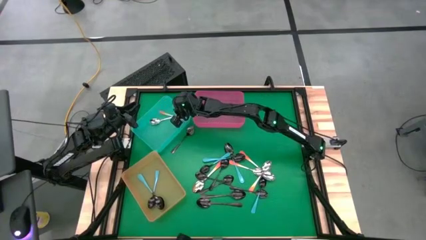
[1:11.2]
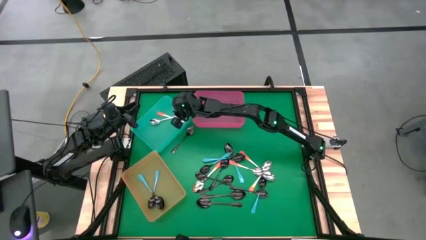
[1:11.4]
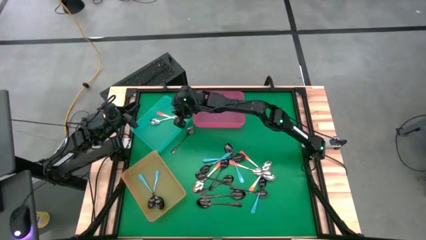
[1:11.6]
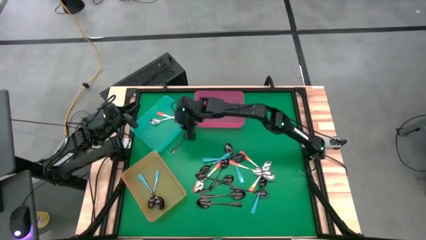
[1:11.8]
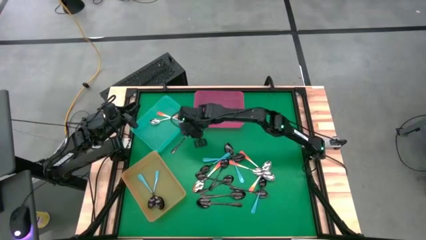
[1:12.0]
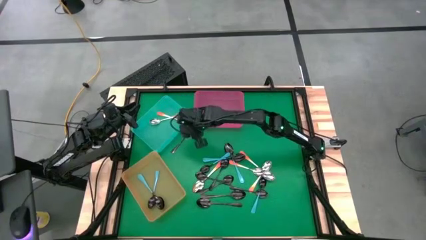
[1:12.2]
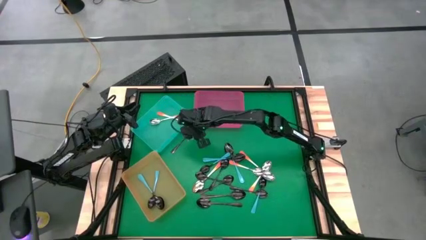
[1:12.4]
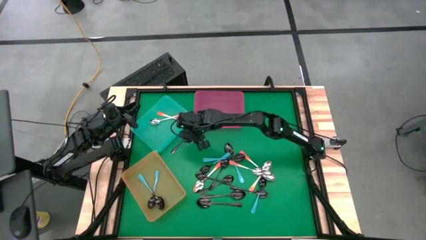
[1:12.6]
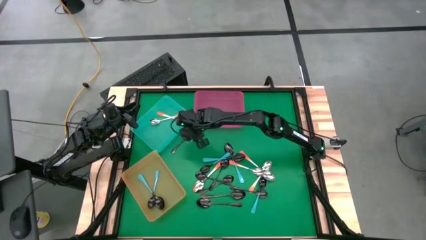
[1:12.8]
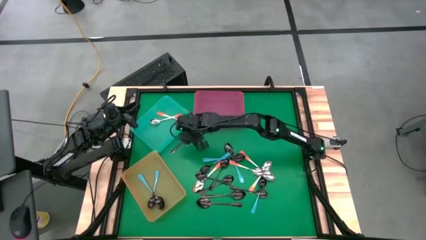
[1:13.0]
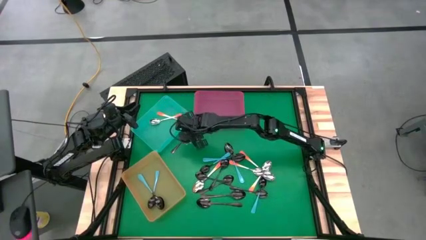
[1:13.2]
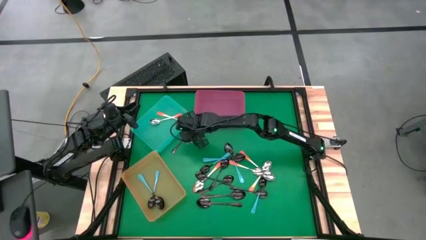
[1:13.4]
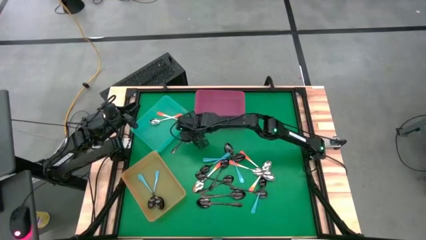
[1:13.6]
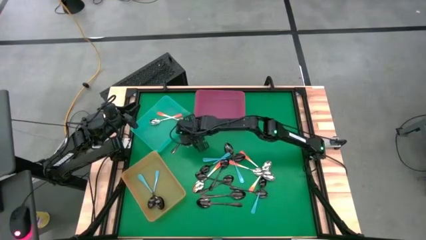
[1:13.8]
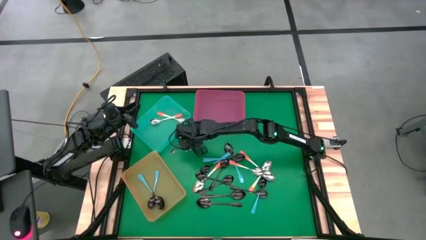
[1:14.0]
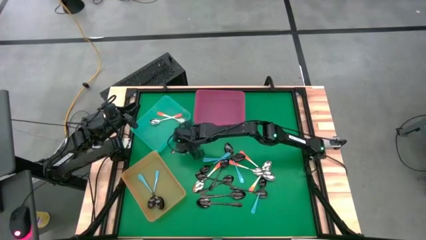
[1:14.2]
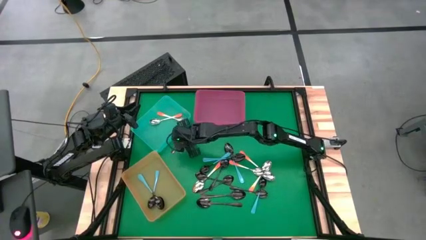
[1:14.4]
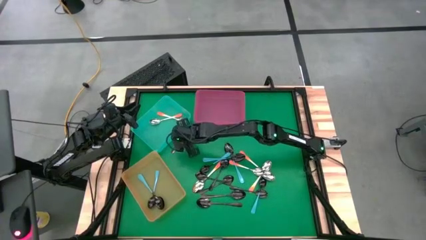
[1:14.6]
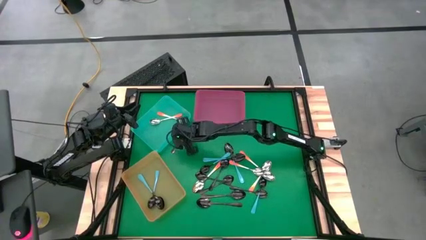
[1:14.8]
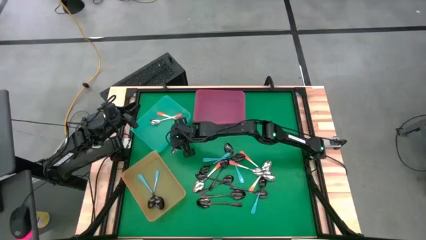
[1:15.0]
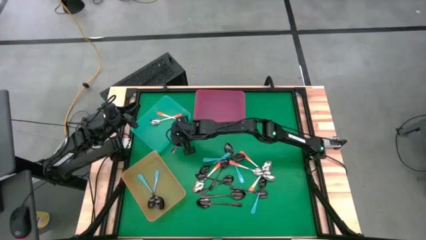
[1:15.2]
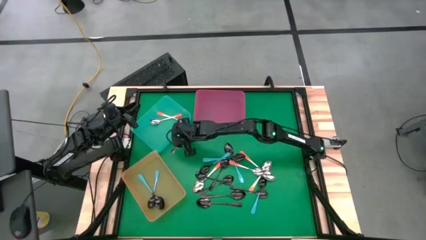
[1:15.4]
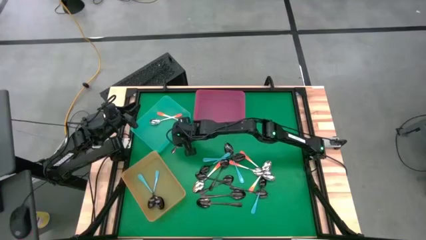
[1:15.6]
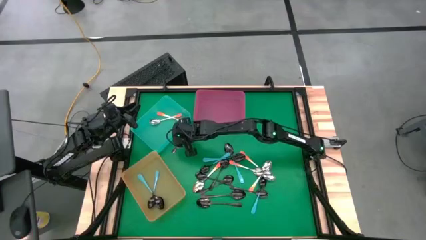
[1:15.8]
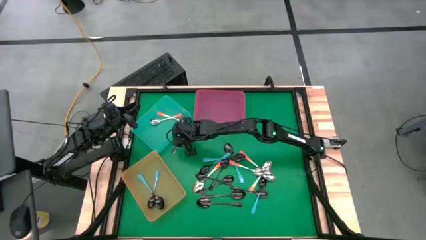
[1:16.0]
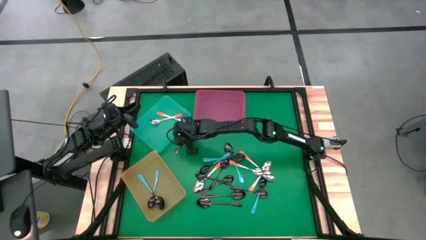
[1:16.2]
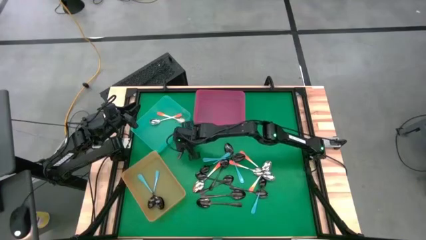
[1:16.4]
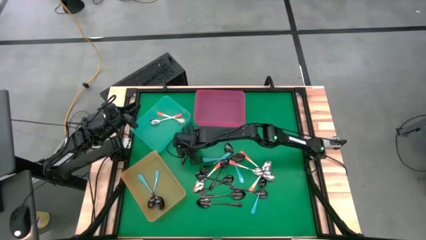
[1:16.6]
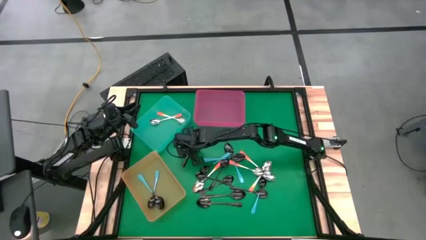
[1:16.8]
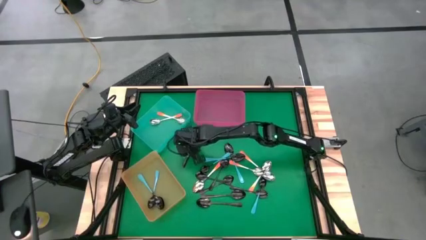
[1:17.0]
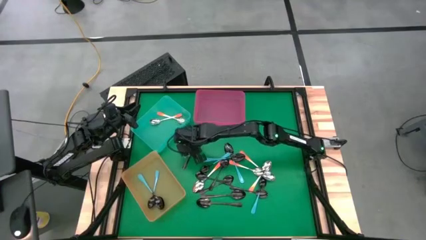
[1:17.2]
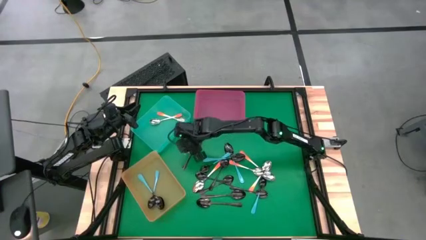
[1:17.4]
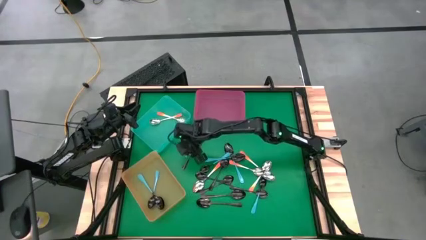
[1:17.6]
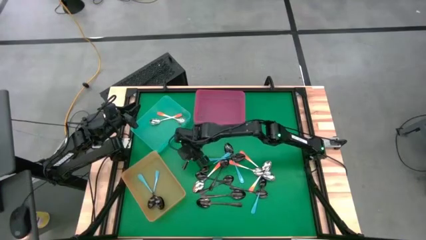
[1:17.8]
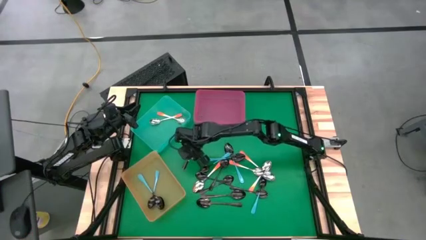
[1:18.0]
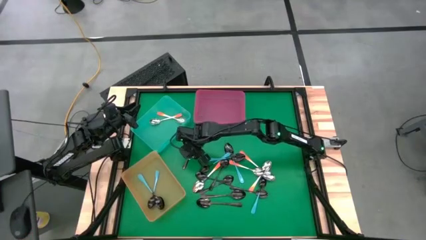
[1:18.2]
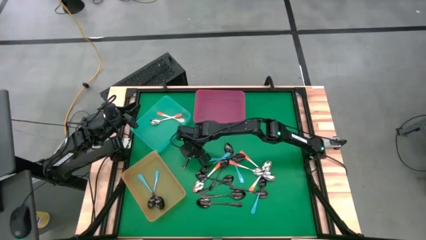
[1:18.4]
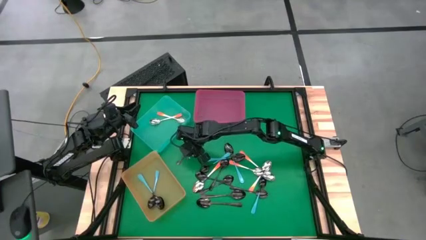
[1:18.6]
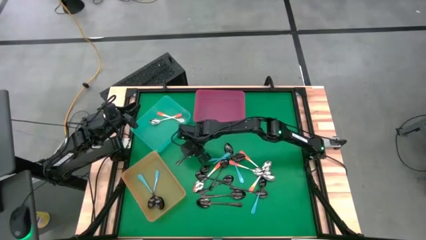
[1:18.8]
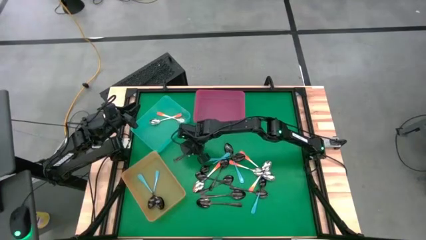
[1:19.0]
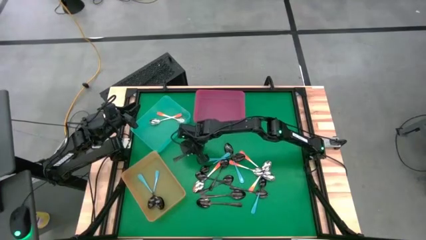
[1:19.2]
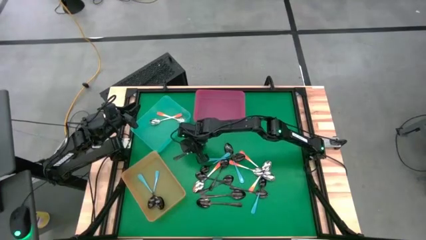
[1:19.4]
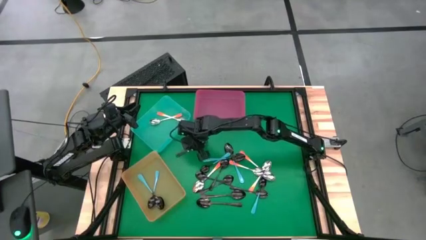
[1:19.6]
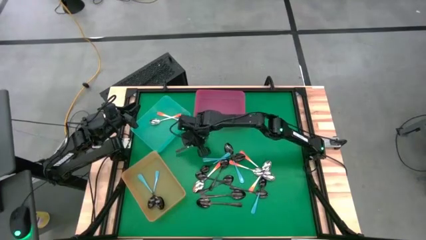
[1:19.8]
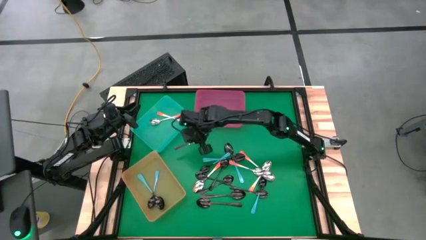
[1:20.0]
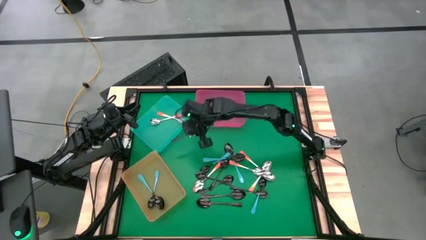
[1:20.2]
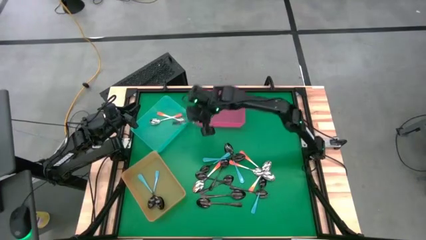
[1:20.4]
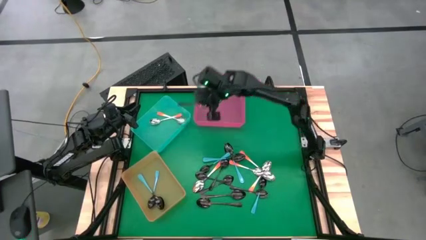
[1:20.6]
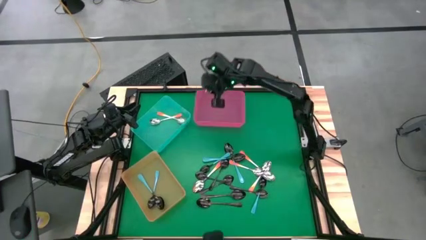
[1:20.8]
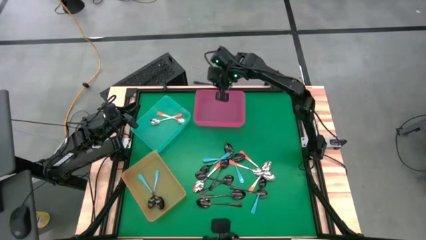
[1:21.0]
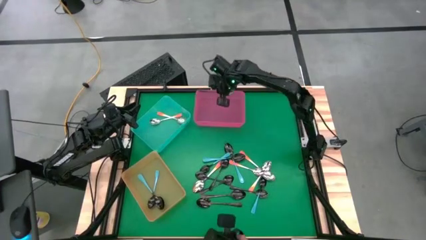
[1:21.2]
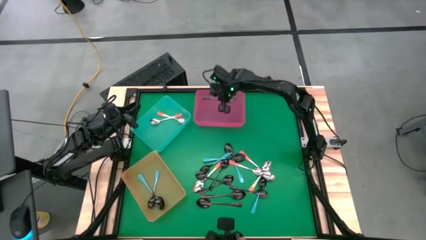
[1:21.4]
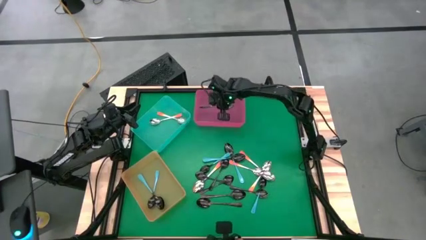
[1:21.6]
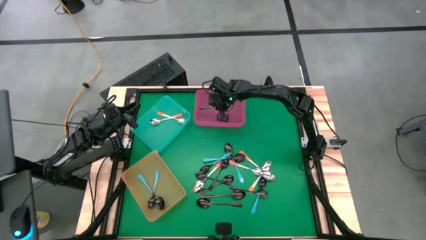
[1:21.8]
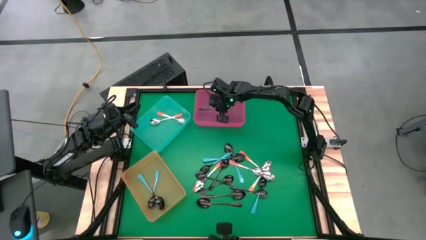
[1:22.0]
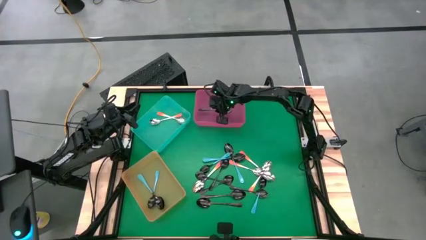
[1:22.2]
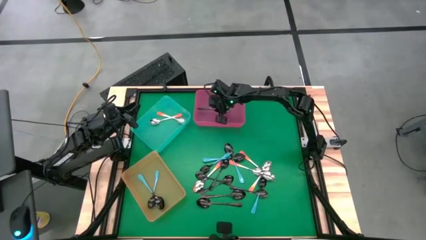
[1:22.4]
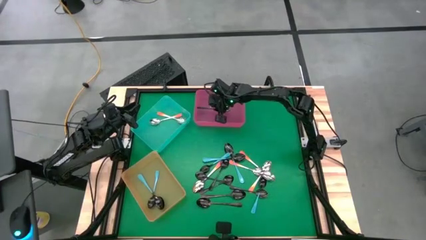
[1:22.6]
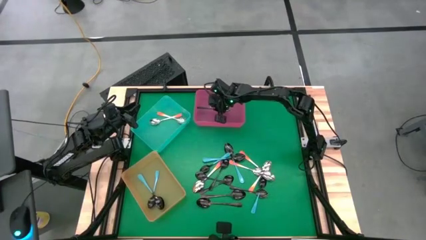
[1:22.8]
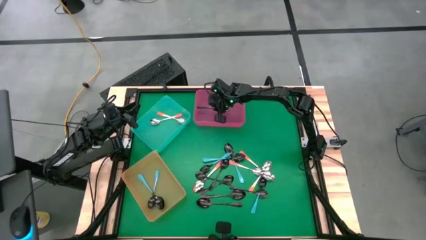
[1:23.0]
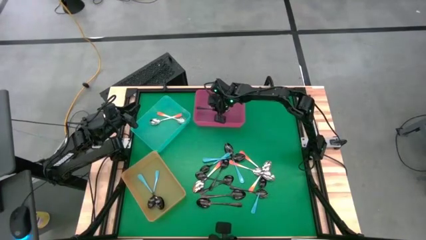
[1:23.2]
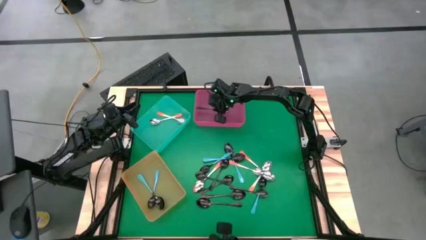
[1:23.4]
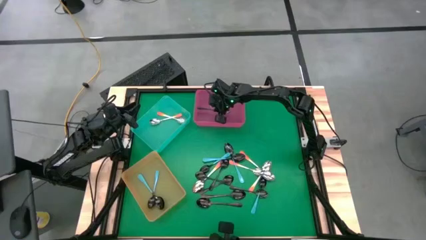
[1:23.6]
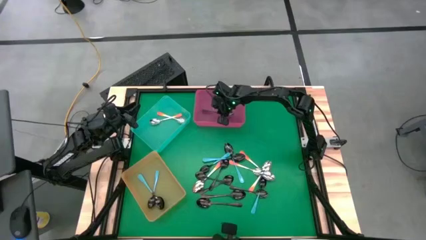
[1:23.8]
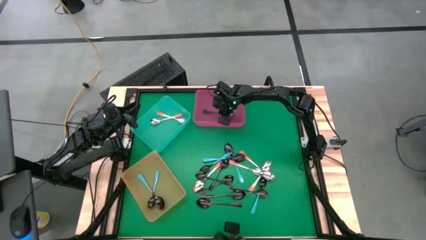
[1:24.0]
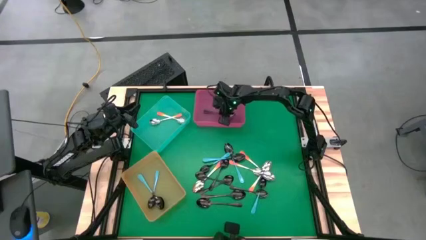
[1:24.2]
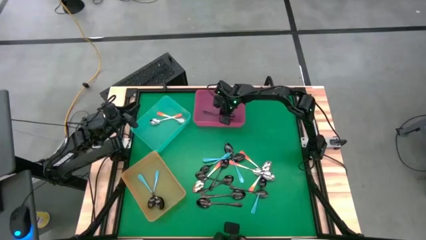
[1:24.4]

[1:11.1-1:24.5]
Task: Sort silverware by color (type)
Put the black spoon into the pink bin

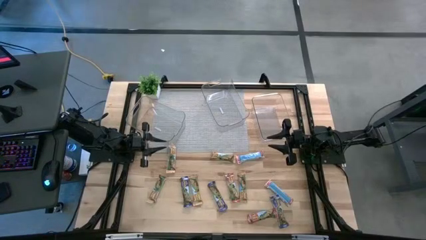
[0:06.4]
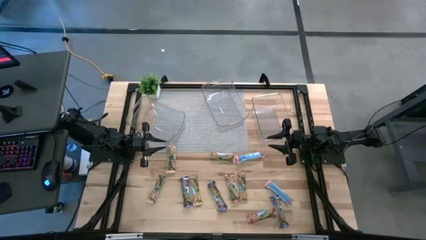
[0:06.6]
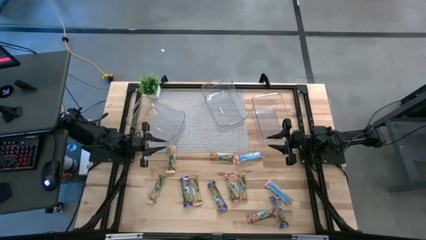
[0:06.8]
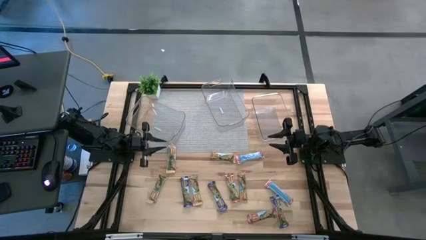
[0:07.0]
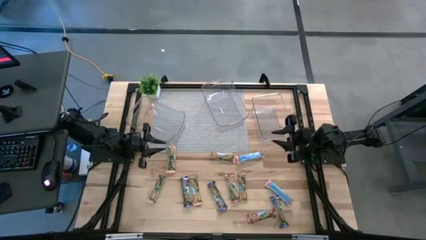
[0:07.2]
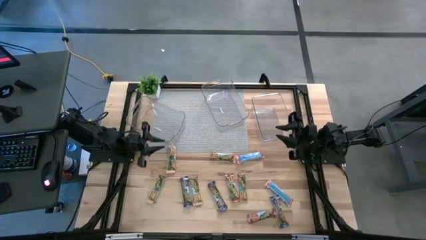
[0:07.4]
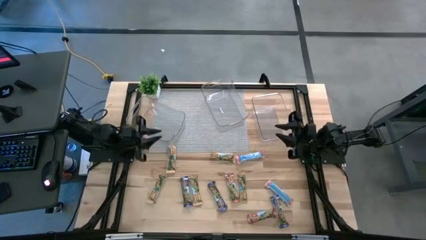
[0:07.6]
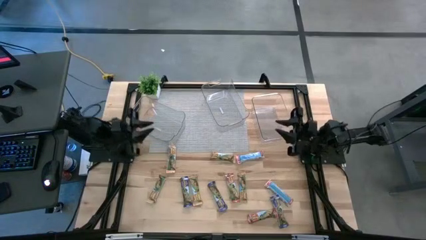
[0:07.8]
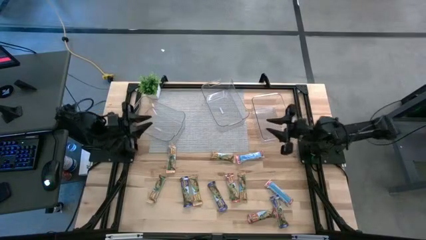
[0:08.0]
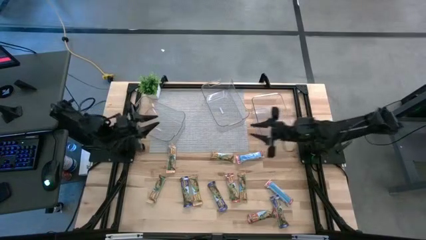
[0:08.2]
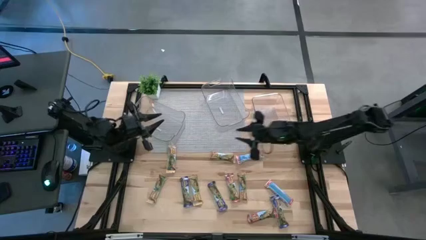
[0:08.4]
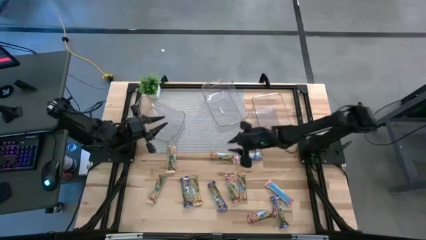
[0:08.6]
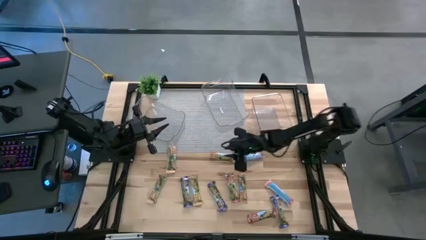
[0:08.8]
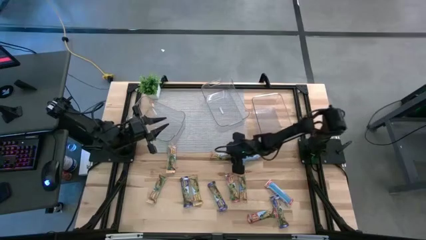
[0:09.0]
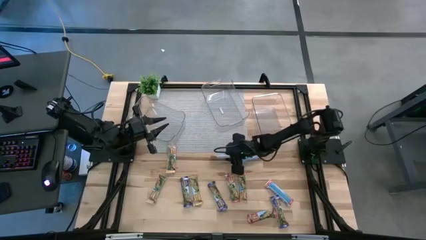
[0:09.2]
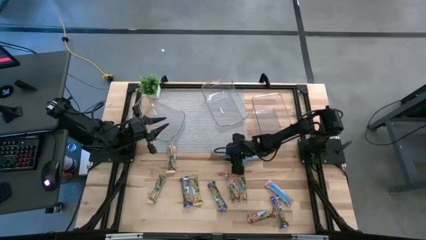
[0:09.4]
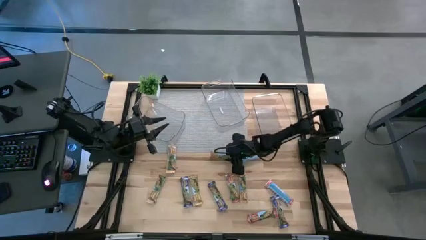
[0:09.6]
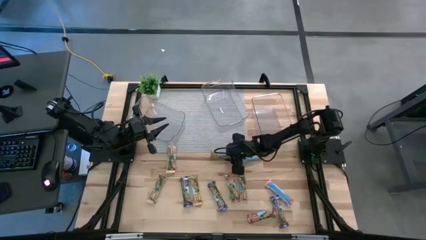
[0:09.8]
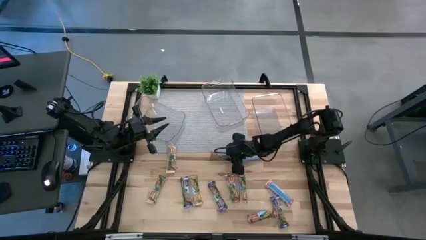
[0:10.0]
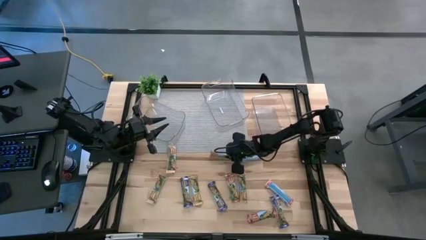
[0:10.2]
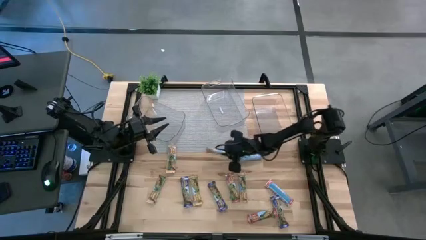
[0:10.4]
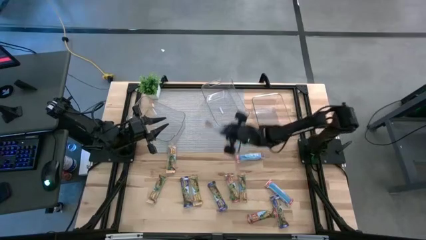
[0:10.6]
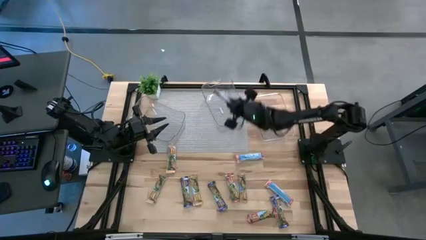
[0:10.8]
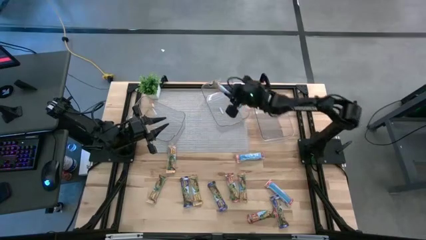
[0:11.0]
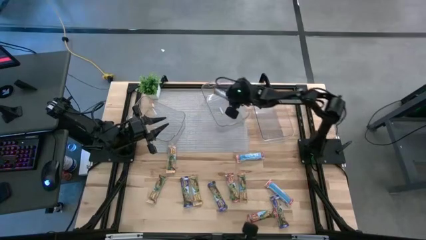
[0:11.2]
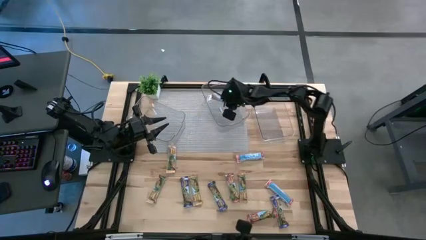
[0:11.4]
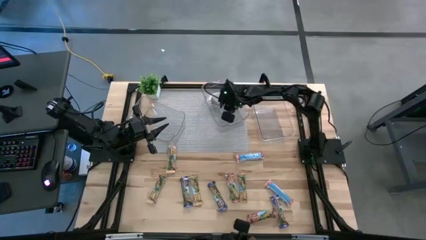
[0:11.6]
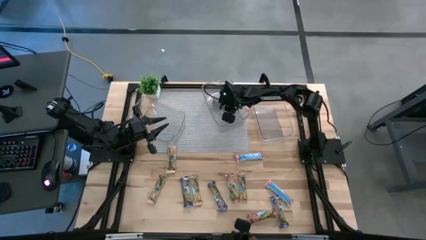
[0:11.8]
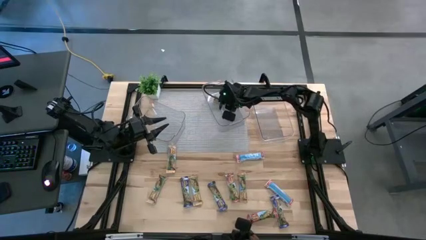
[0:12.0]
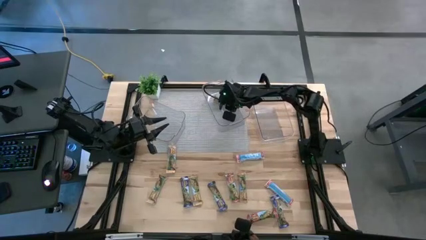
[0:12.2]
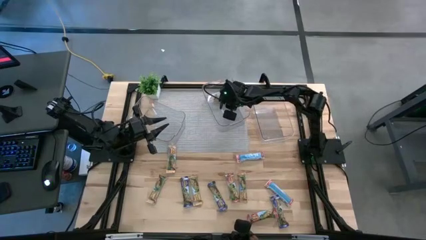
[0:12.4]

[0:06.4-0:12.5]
Task: Pick and place Granola Bars by type
Put the yellow granola bar into the middle transparent bin
